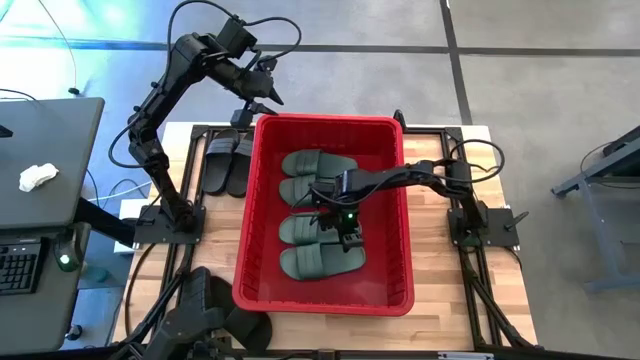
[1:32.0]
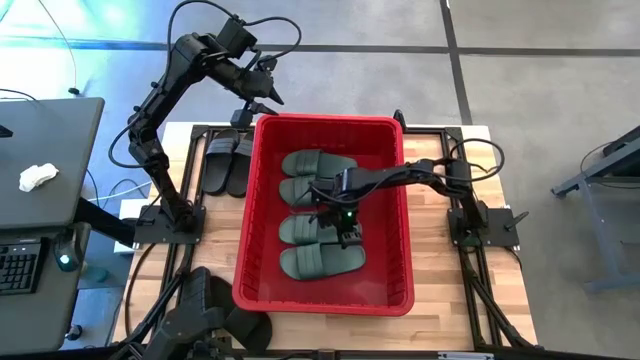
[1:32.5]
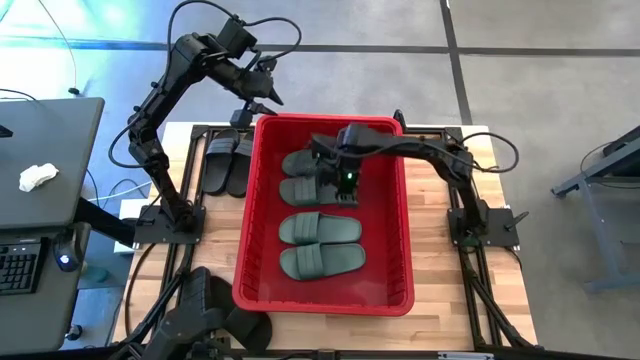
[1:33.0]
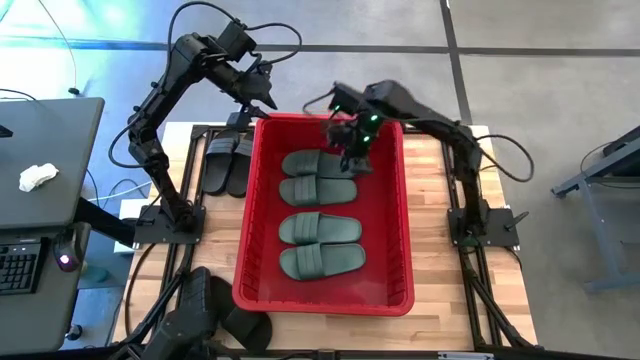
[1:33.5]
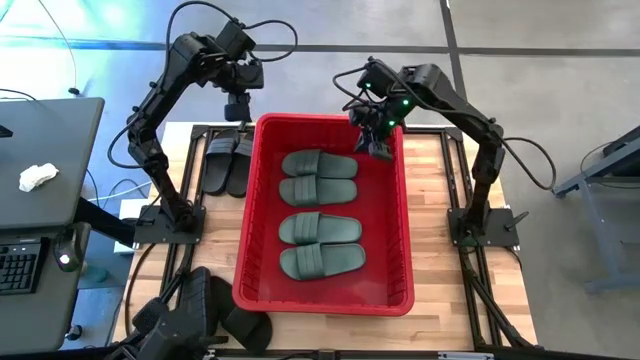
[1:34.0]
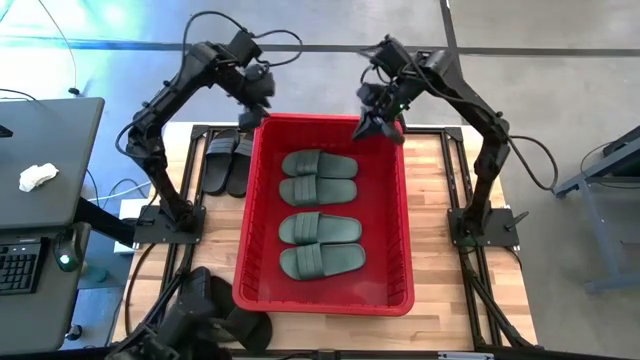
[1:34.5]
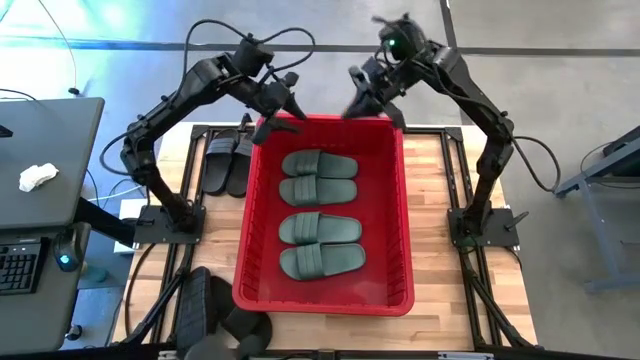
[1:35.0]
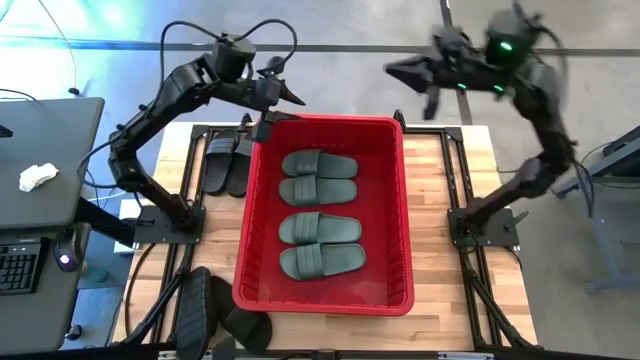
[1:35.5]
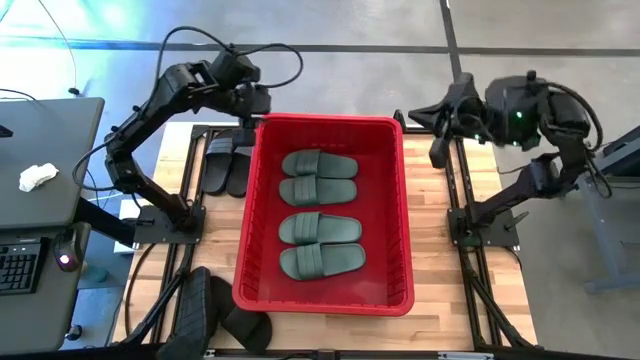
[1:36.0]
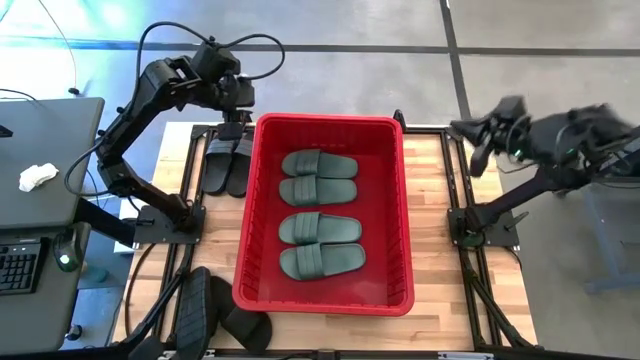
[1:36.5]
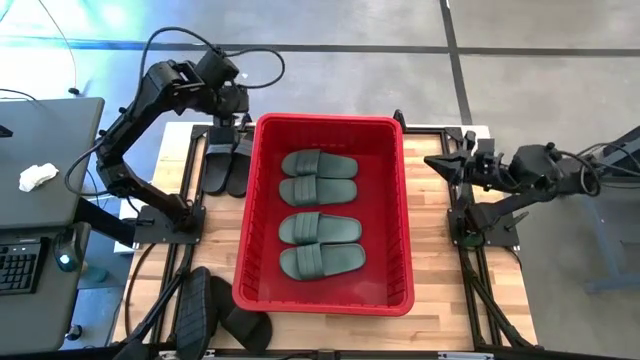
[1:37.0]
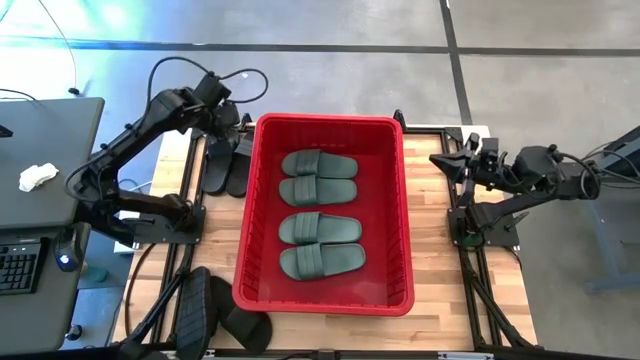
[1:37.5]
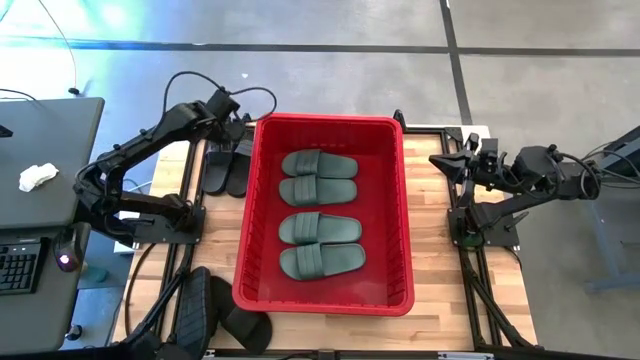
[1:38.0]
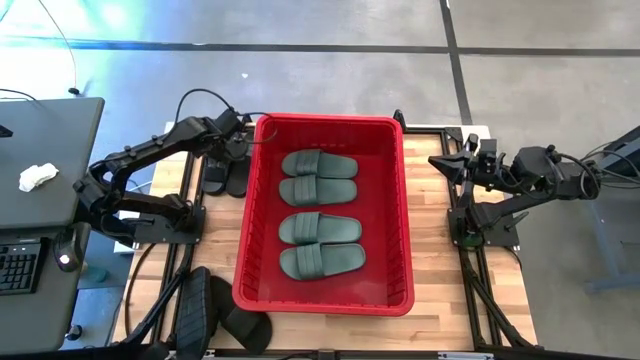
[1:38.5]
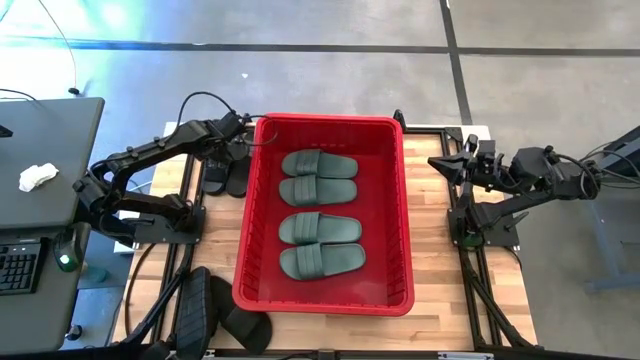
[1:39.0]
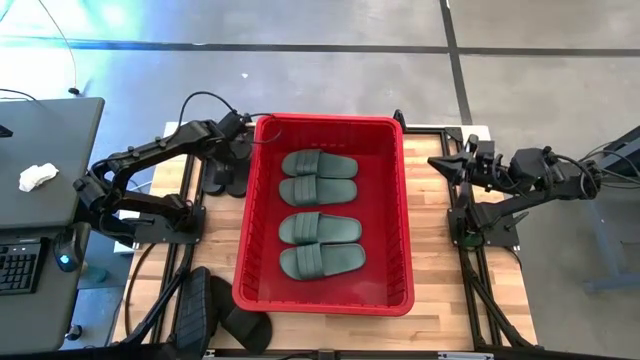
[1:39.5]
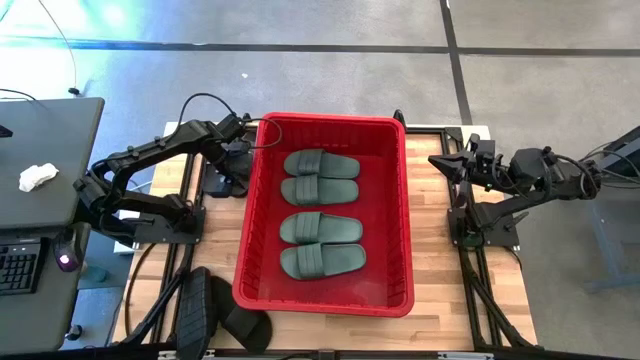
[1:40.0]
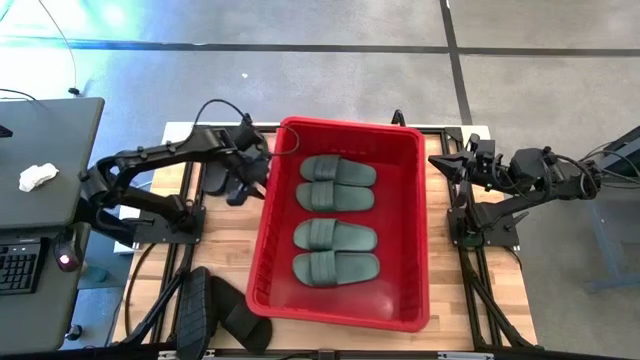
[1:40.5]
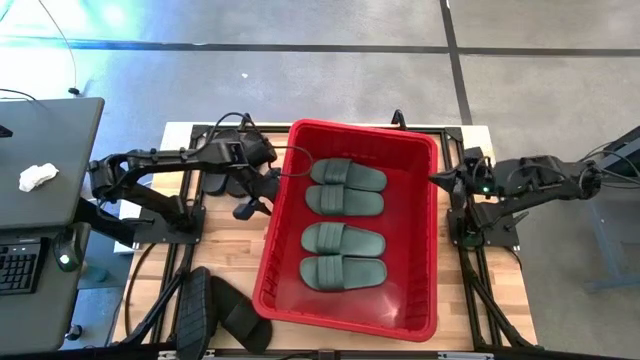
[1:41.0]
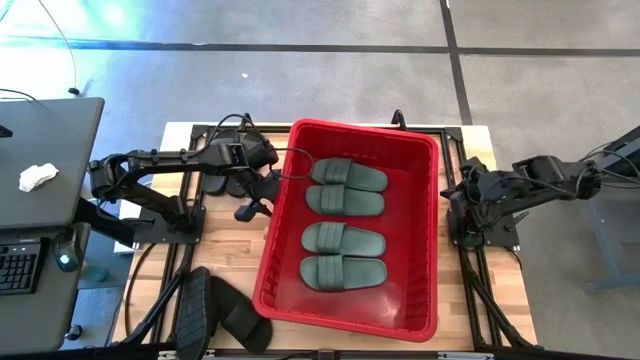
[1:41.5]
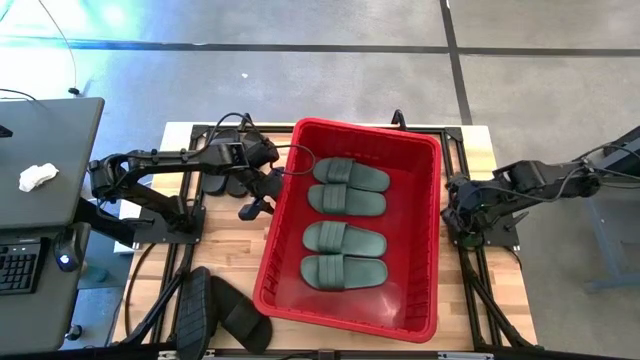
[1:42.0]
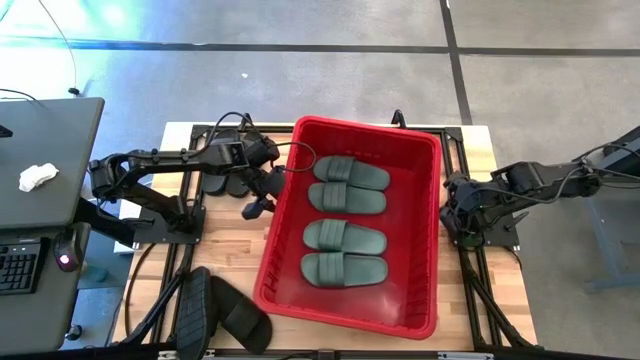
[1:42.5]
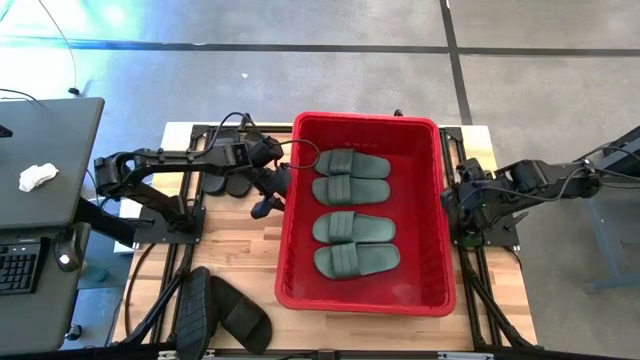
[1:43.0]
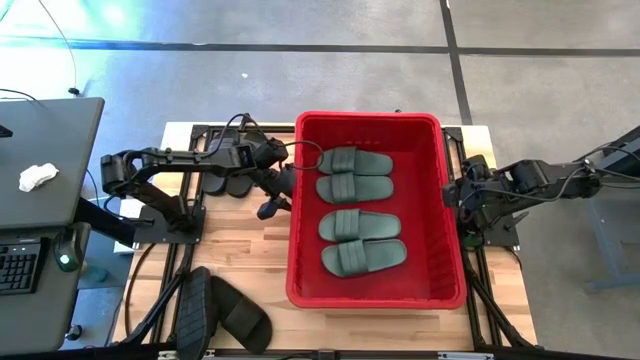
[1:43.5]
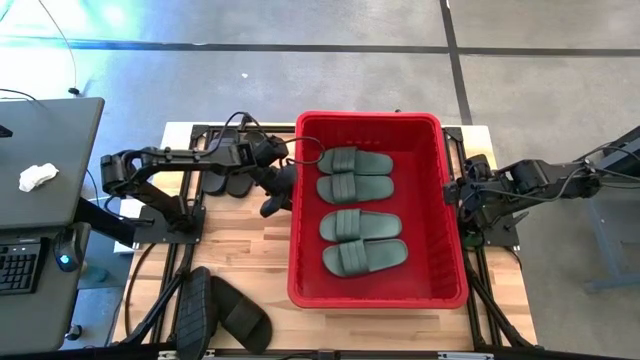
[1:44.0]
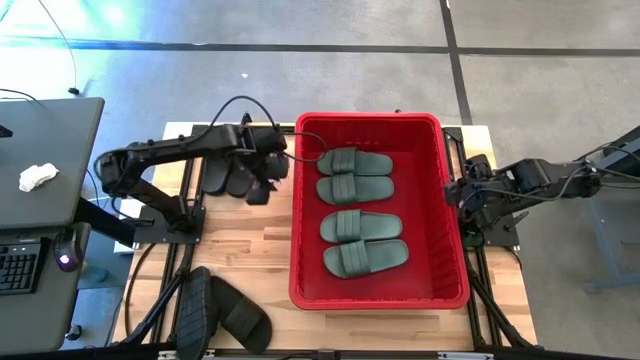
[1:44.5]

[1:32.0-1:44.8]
Task: Pick and place slides into bin
Adjust the red container on the table

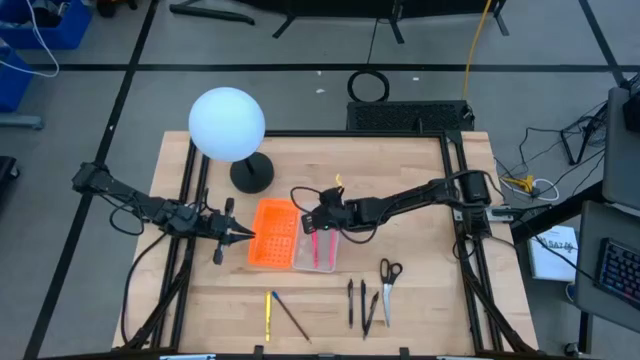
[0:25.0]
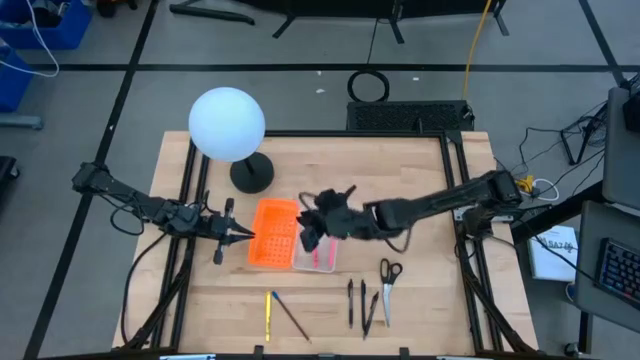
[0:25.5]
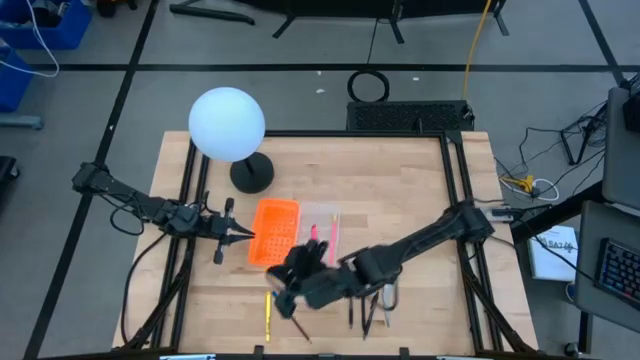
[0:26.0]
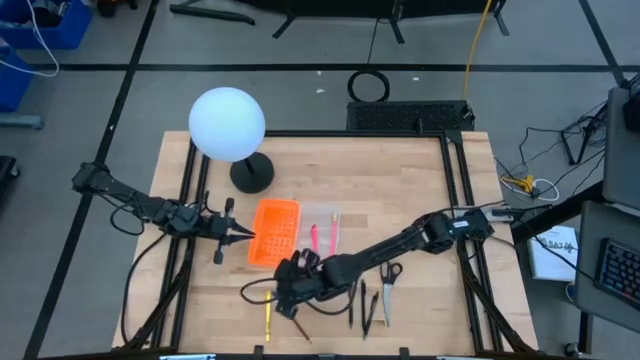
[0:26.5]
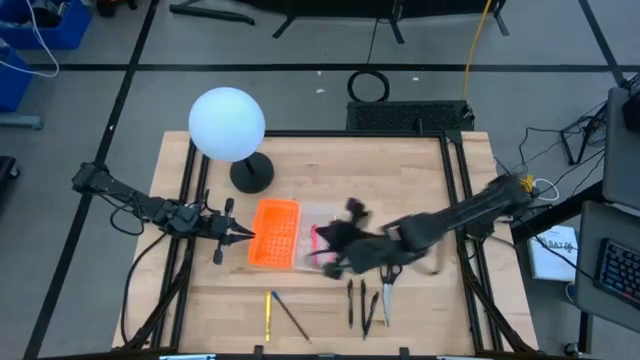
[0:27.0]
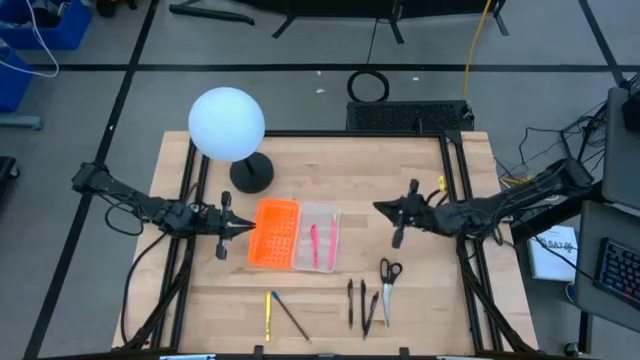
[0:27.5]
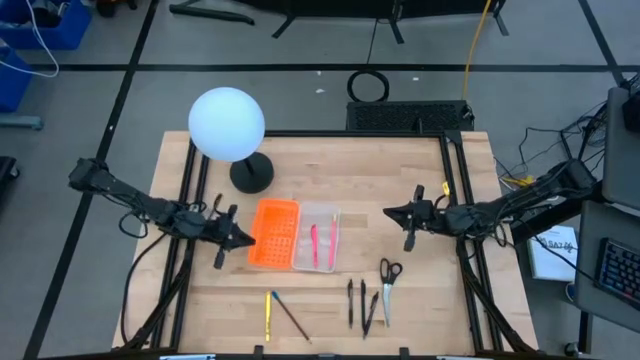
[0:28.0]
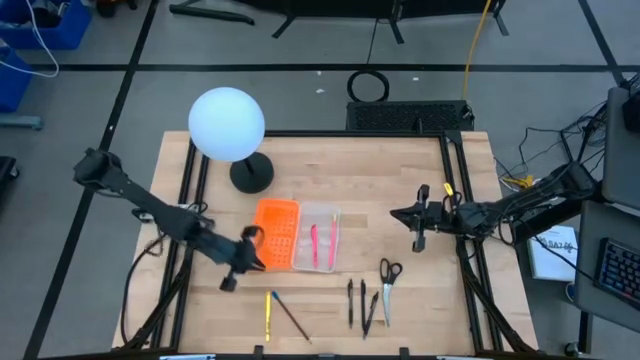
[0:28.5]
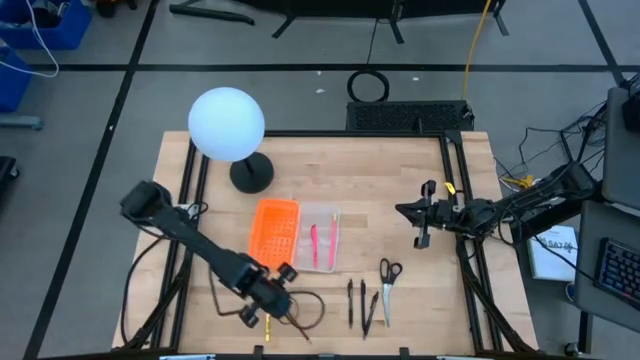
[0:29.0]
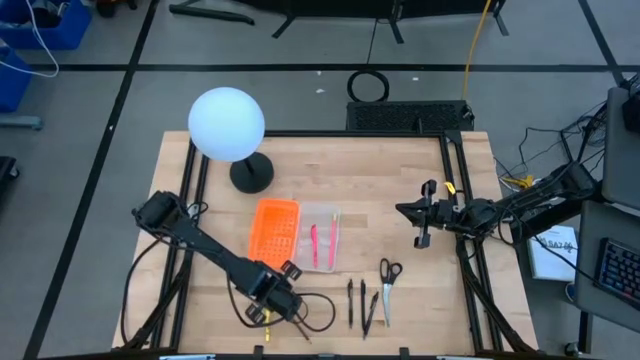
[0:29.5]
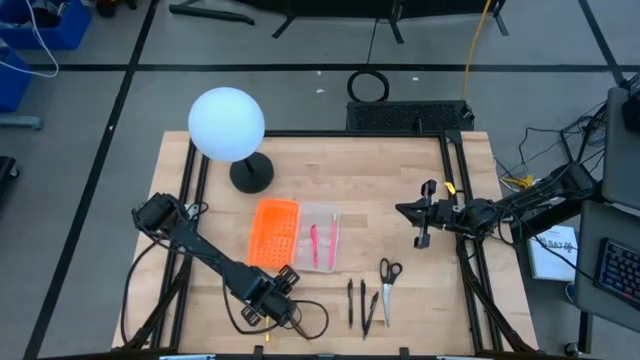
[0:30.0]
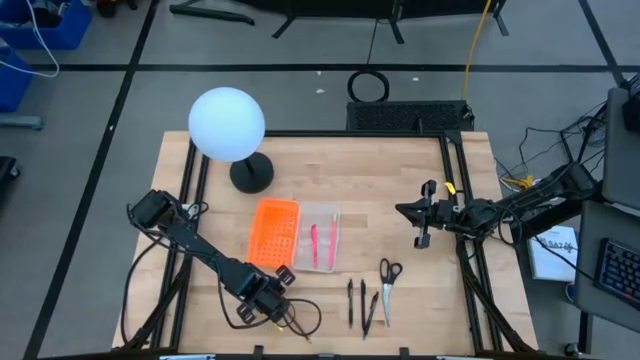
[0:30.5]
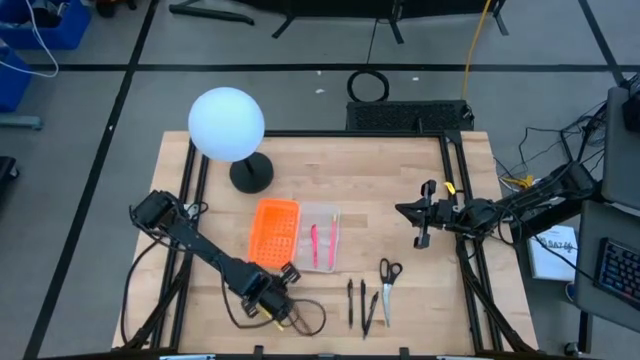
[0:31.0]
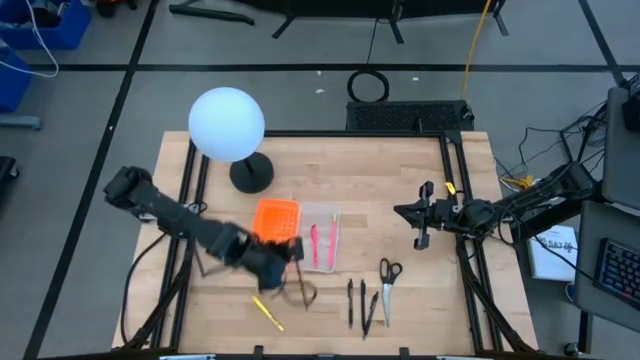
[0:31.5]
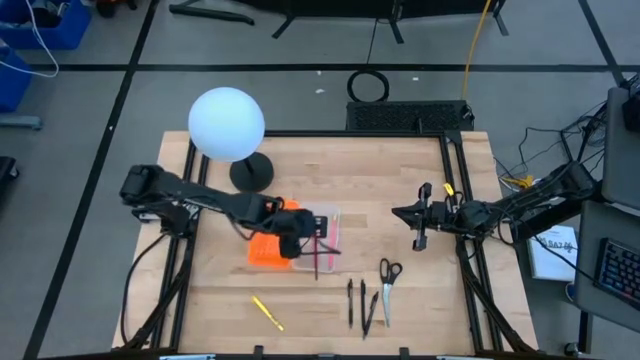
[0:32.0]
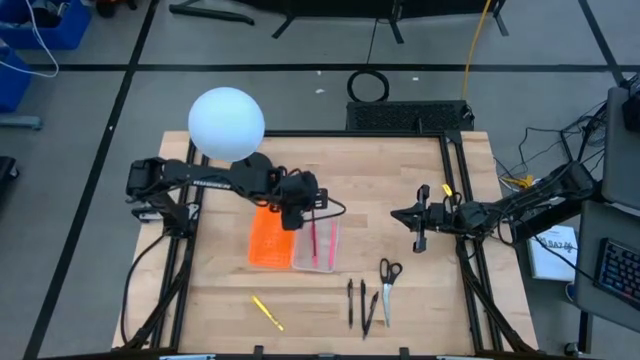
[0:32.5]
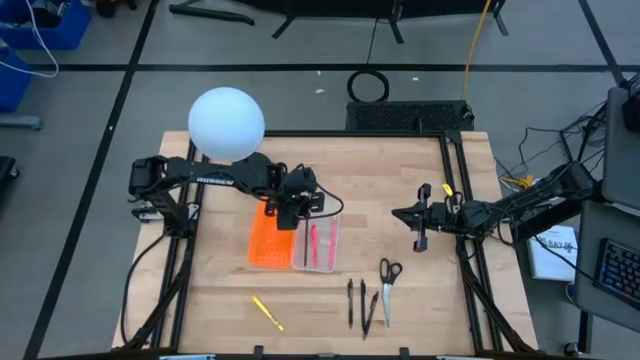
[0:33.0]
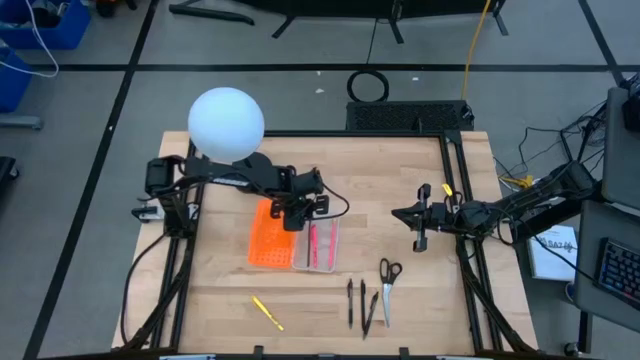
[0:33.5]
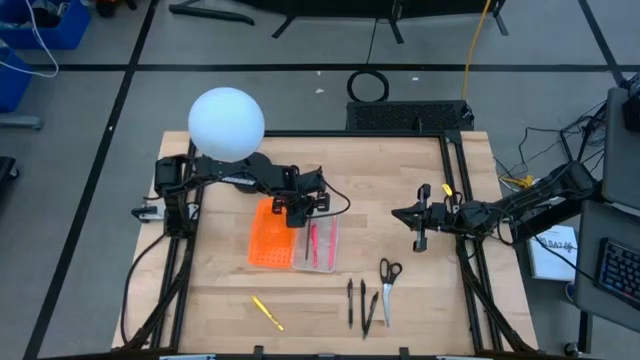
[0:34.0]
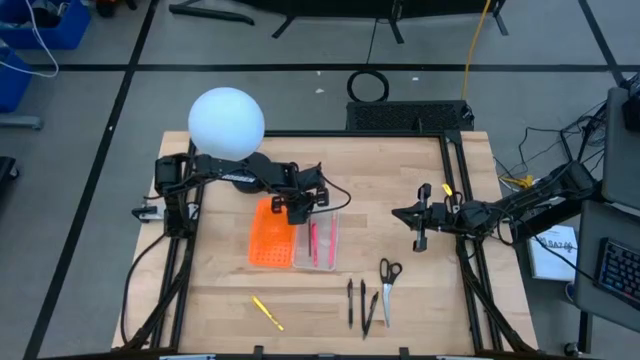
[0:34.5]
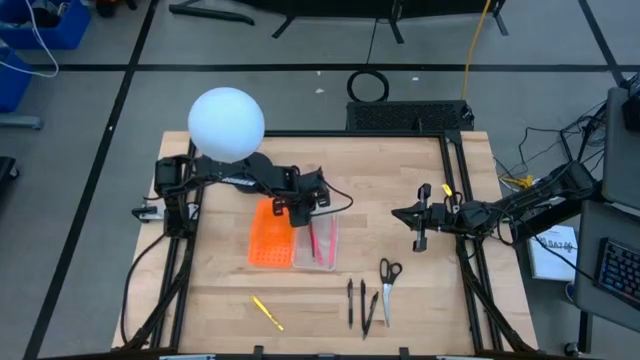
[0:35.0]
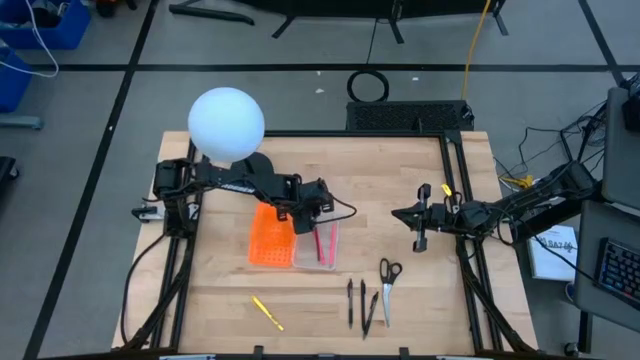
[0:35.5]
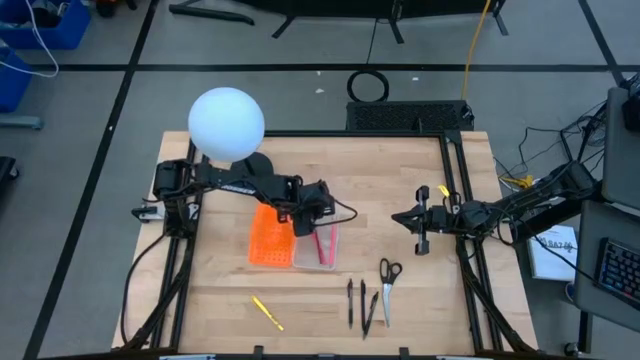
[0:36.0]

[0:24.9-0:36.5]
Task: Pick & place school supplies into a supply box
Put the brown pencil into the supply box
